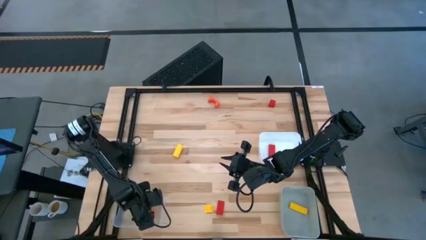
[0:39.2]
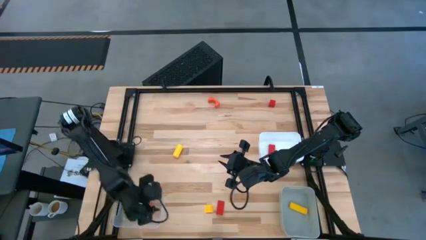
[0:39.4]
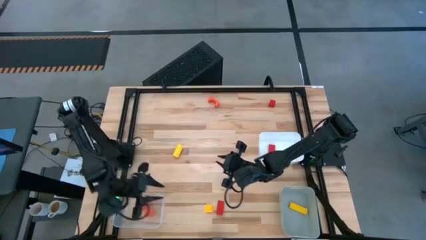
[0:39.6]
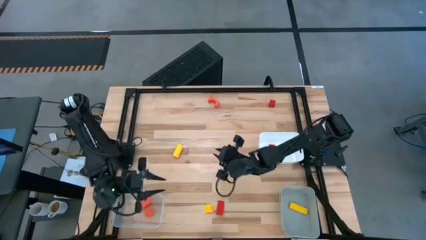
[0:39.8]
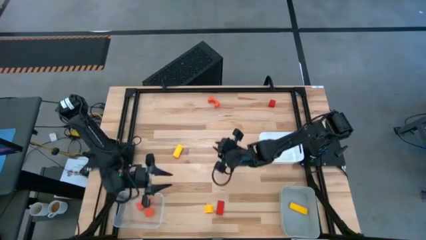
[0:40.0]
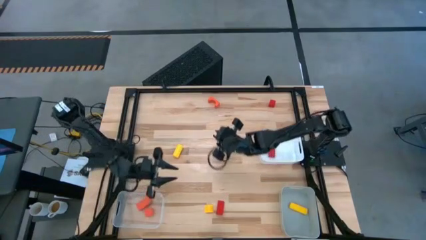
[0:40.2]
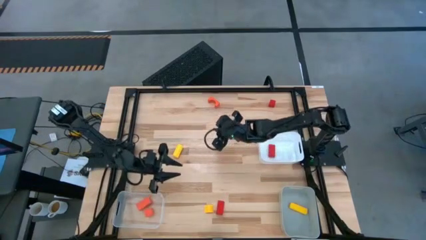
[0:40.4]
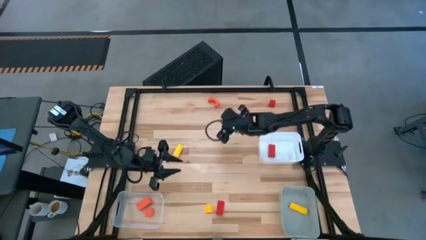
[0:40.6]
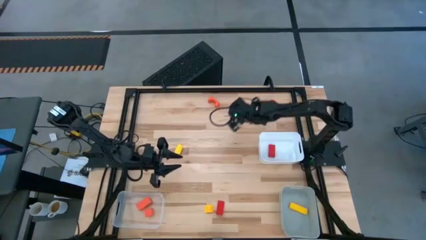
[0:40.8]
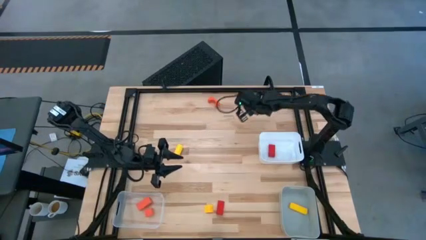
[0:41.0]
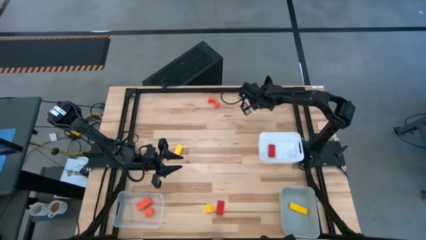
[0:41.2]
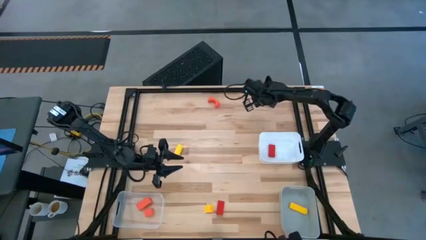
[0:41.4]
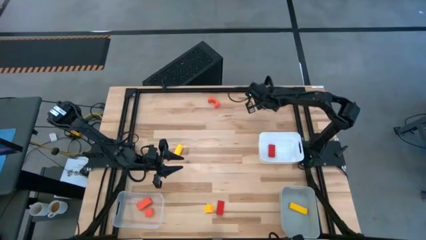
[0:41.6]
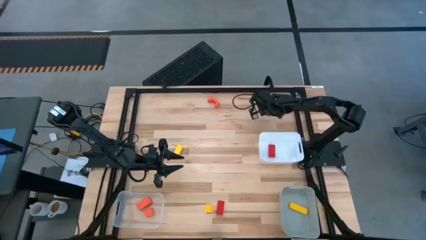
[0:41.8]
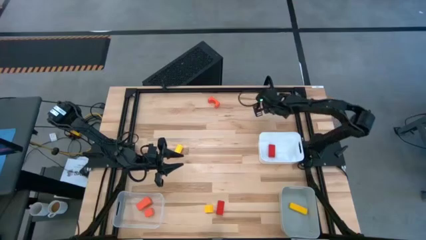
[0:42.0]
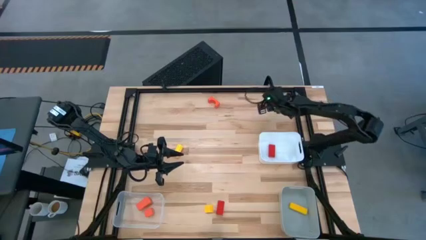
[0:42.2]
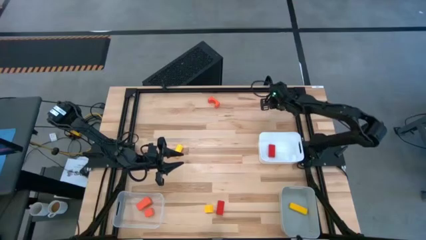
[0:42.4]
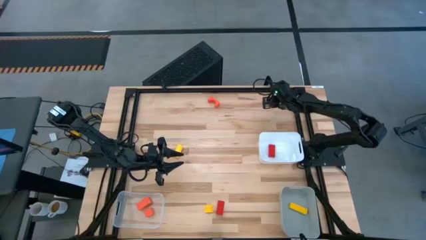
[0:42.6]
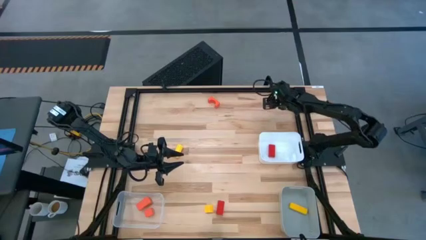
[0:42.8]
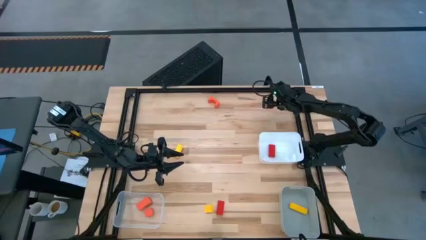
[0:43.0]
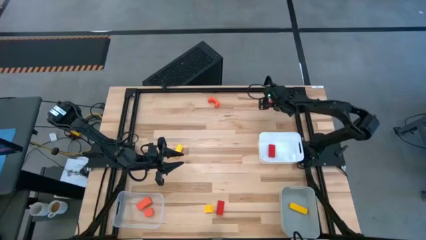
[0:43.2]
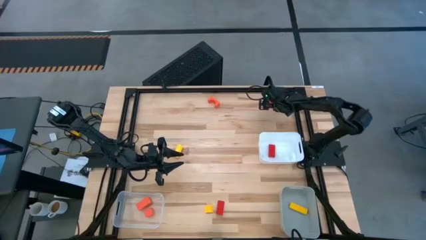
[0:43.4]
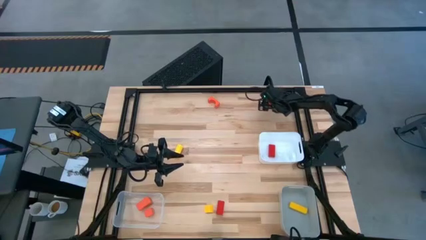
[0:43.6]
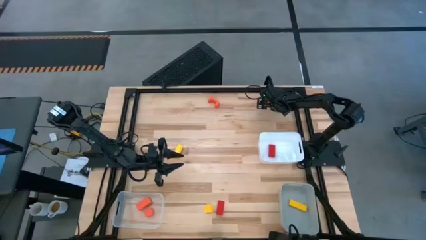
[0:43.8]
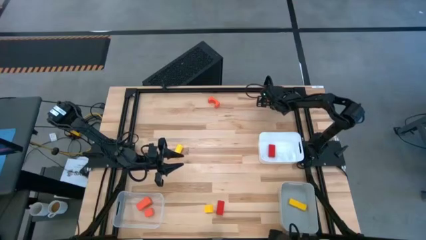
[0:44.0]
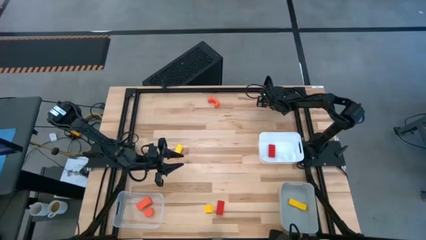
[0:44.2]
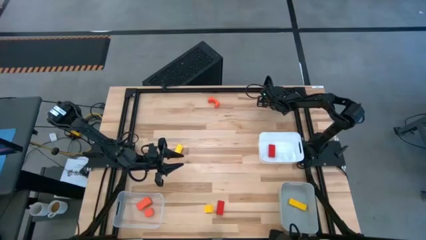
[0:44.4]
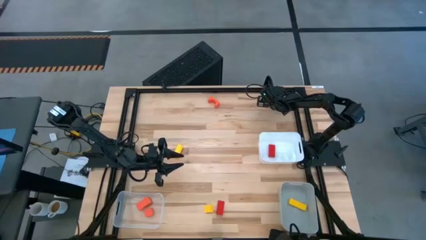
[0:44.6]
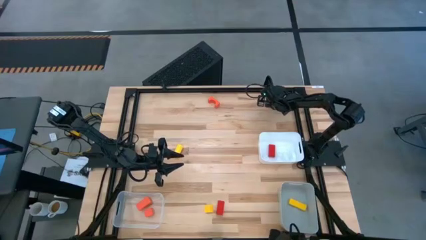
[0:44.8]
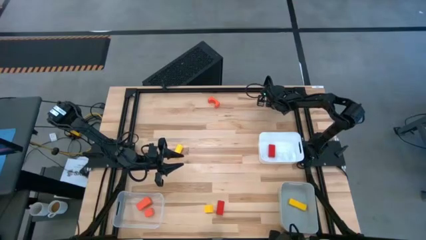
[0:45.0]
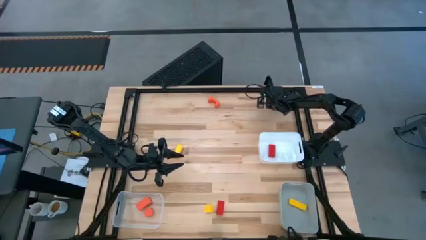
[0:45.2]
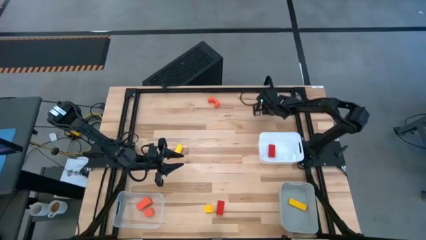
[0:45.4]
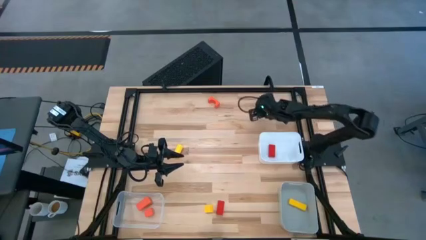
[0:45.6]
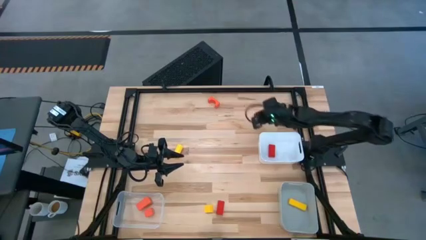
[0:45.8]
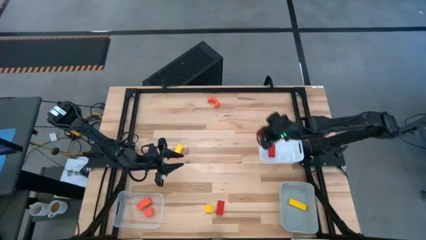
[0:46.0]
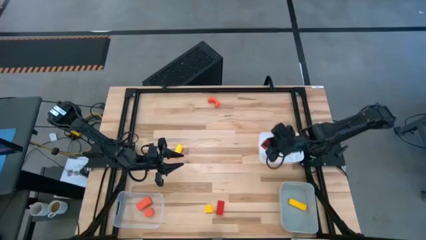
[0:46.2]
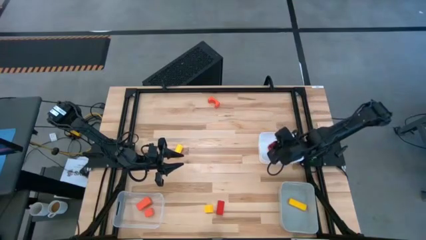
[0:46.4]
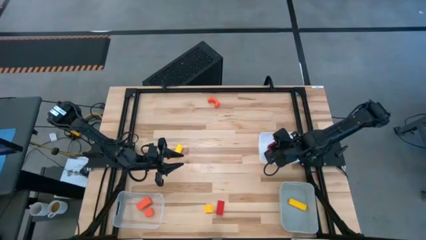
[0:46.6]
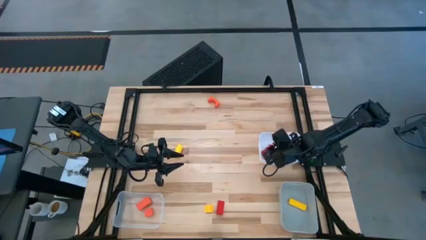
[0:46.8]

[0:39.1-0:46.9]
Task: Sort & place blocks by color
Put the top red block into the white bin

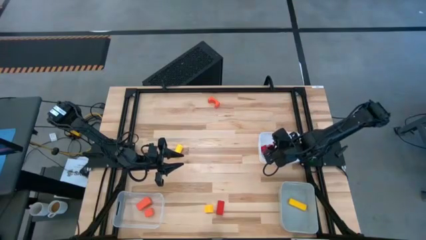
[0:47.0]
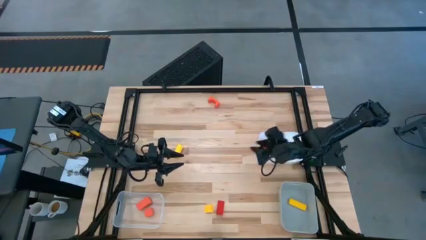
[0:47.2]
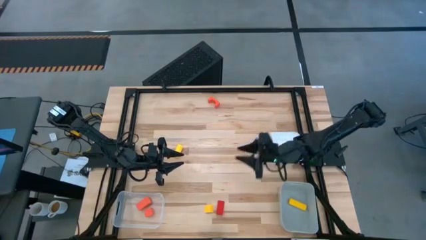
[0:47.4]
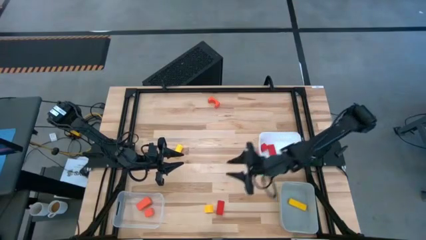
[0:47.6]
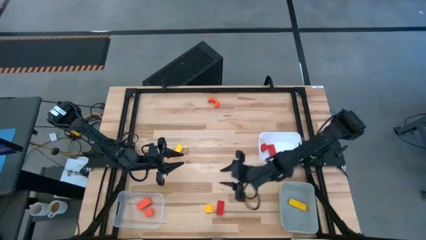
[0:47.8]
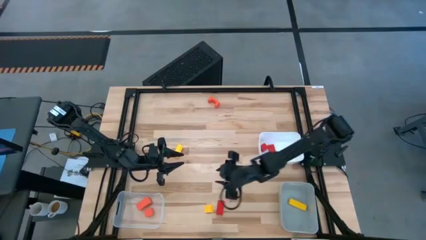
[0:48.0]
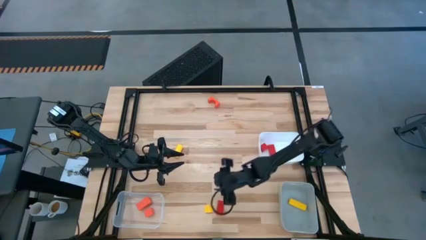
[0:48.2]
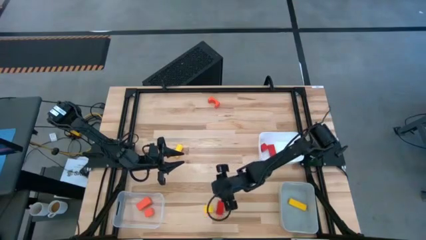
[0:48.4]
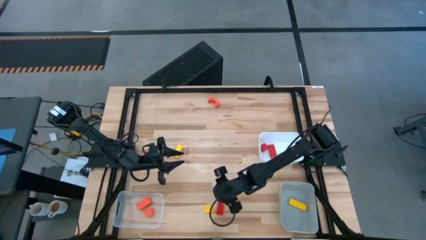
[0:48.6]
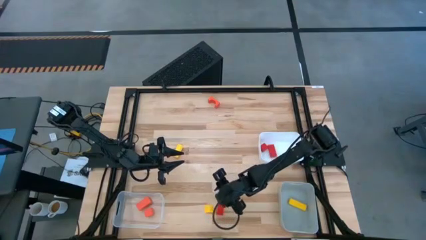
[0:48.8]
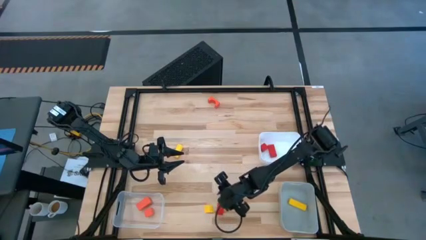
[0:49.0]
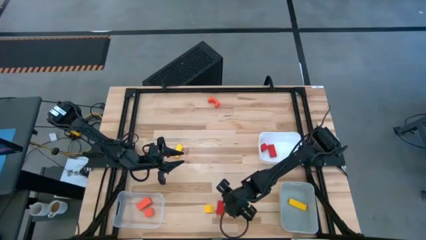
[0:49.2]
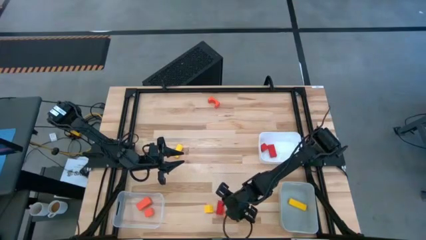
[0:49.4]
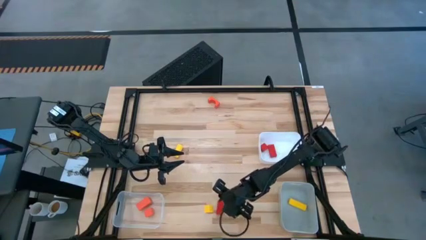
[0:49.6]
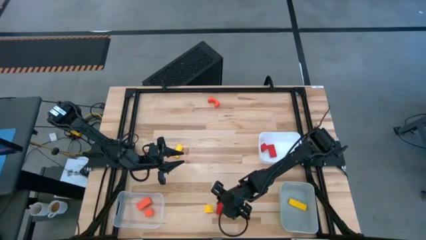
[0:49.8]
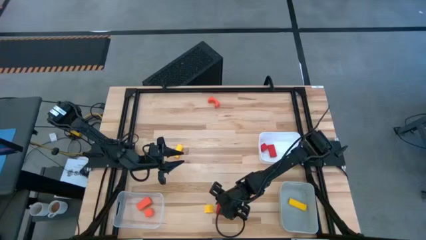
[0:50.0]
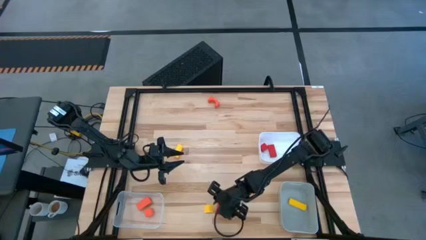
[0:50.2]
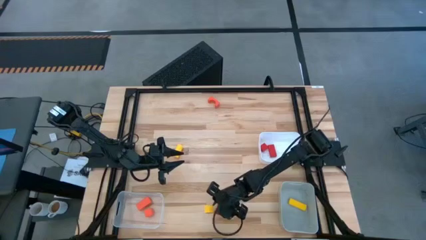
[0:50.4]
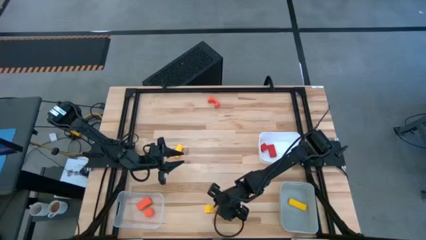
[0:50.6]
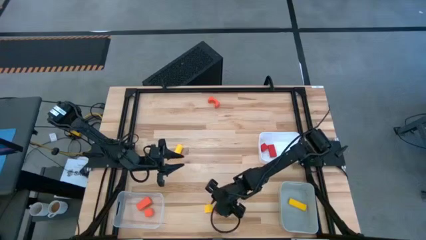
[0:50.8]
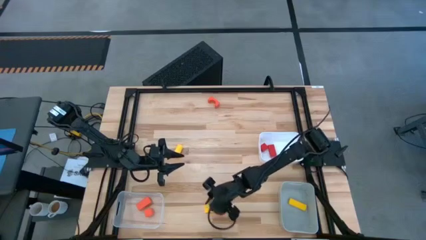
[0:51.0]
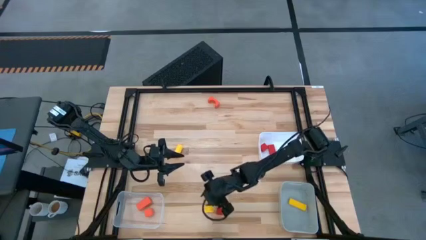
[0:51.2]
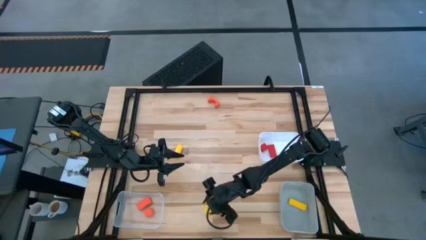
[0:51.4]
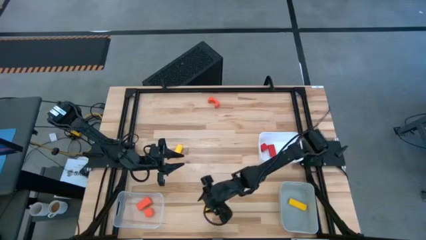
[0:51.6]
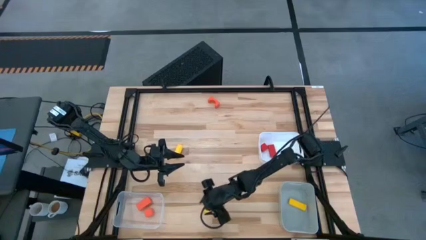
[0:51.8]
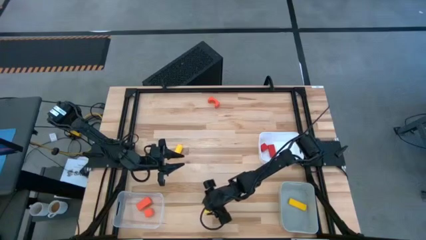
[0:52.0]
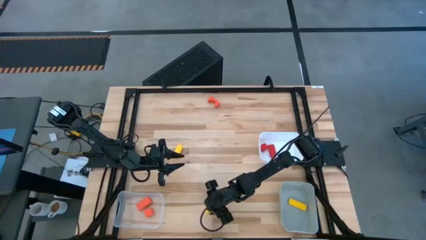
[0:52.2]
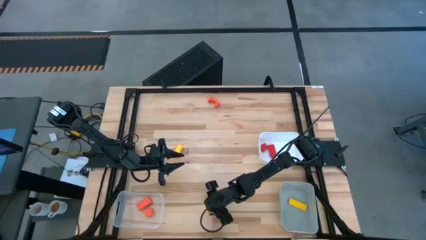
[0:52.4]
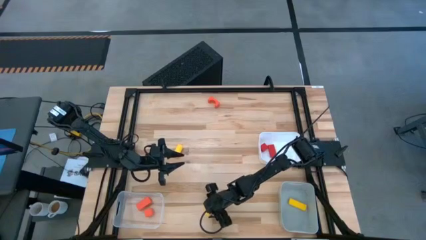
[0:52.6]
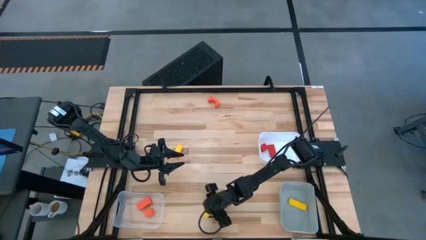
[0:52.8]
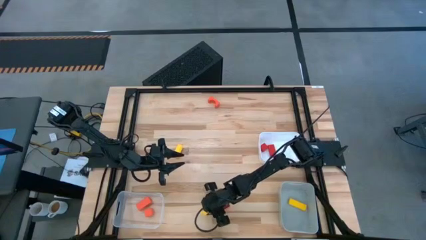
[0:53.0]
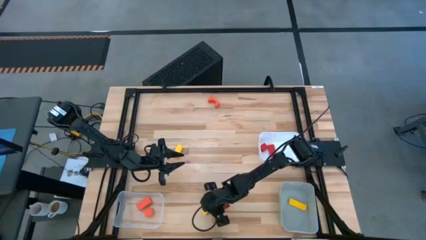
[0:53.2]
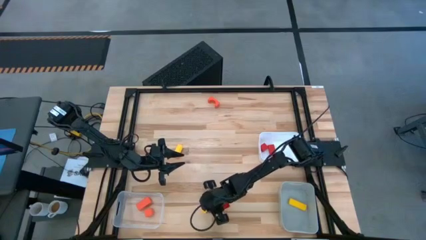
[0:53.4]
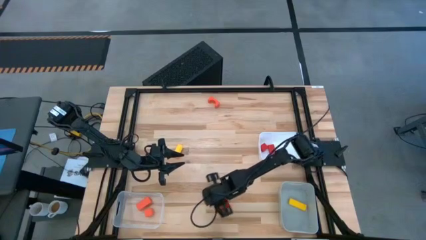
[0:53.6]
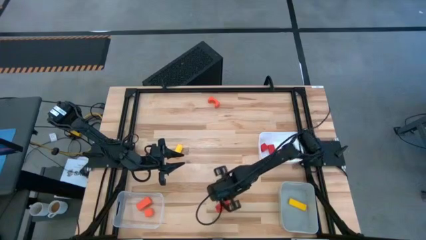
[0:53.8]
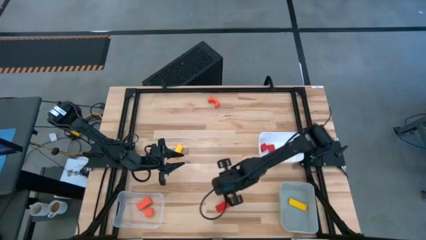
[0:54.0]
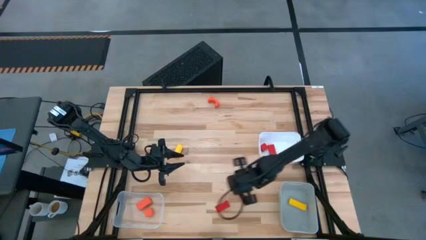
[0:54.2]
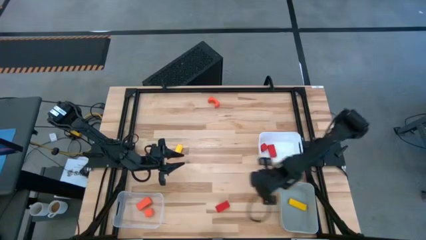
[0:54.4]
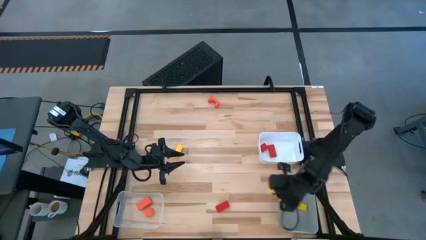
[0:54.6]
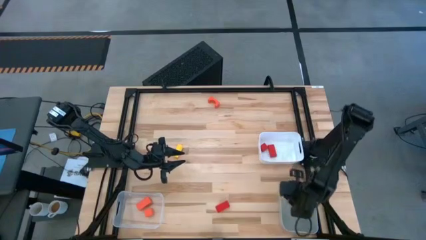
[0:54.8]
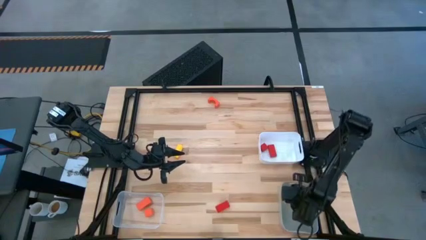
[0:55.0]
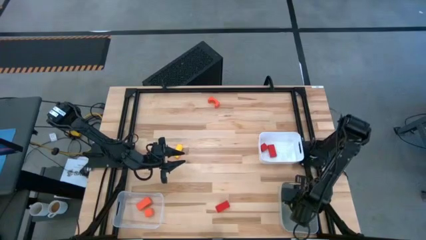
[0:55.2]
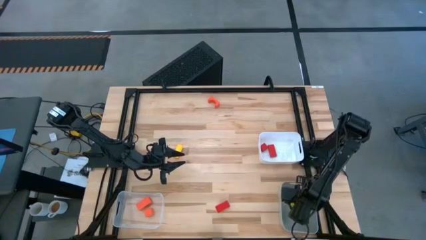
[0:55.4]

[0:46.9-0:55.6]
Put the bottom yellow block into the gray bin
